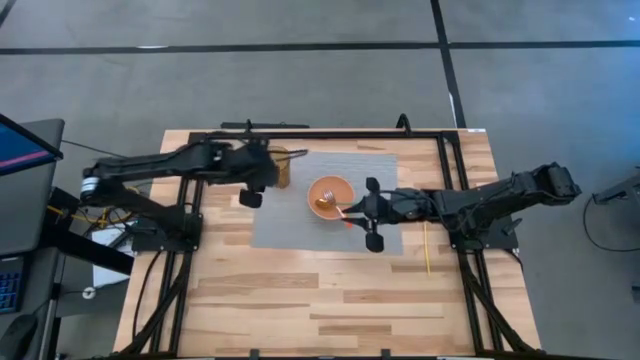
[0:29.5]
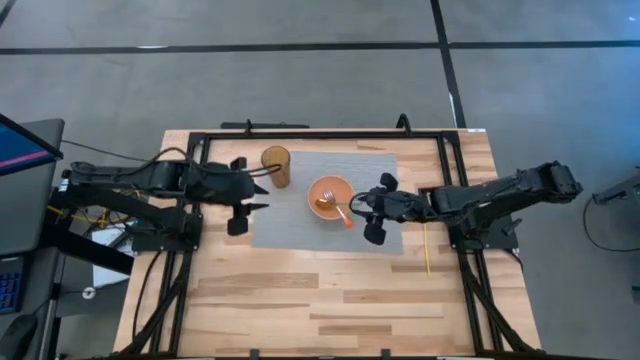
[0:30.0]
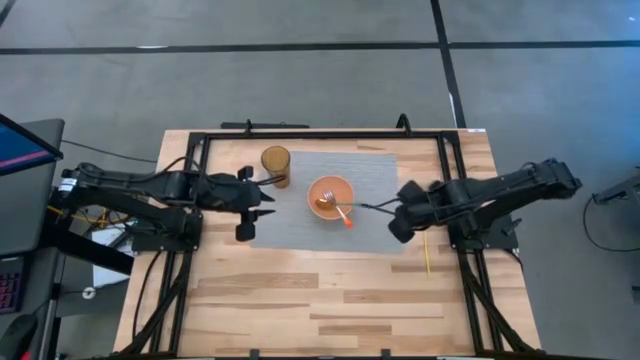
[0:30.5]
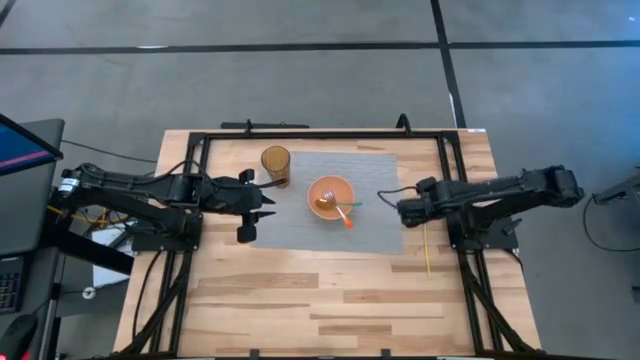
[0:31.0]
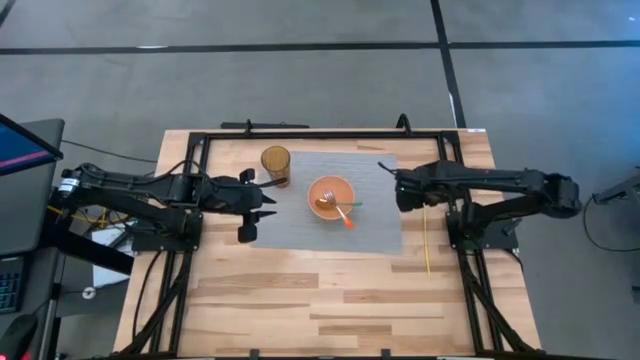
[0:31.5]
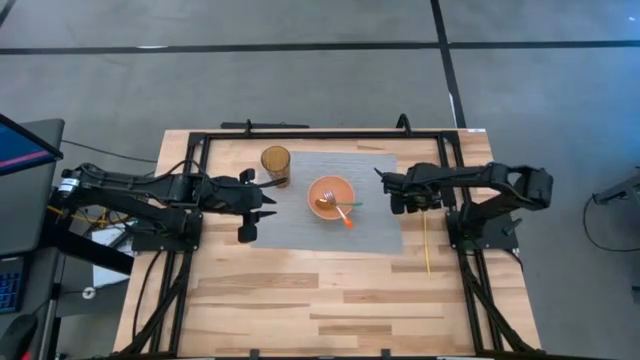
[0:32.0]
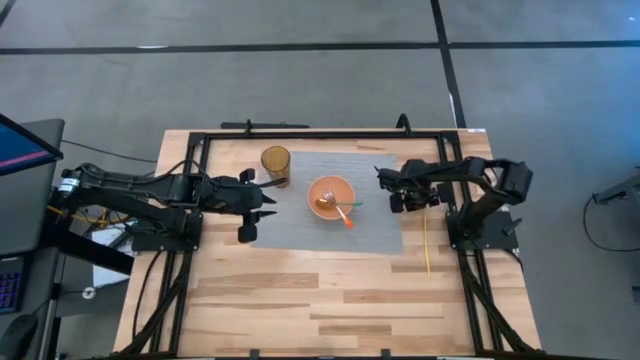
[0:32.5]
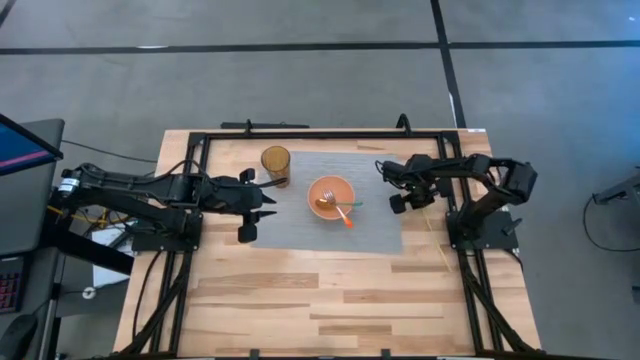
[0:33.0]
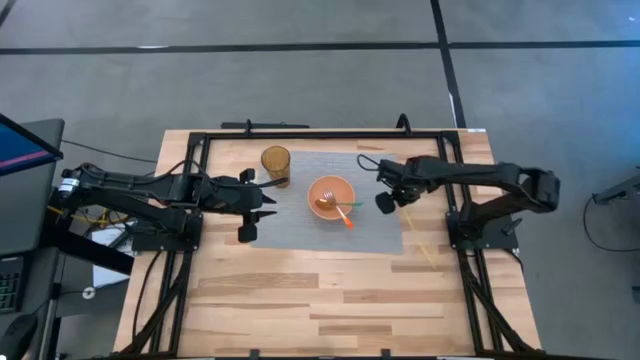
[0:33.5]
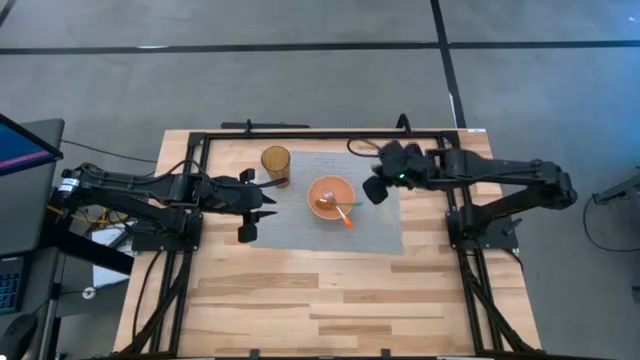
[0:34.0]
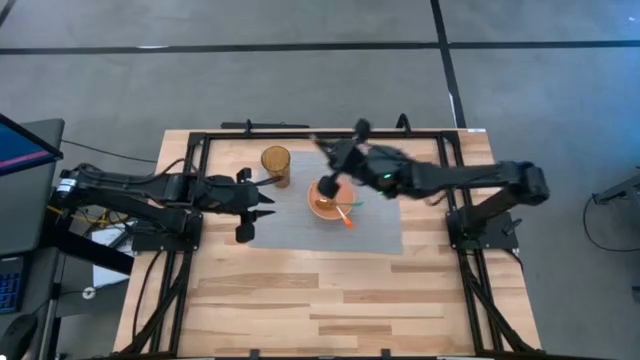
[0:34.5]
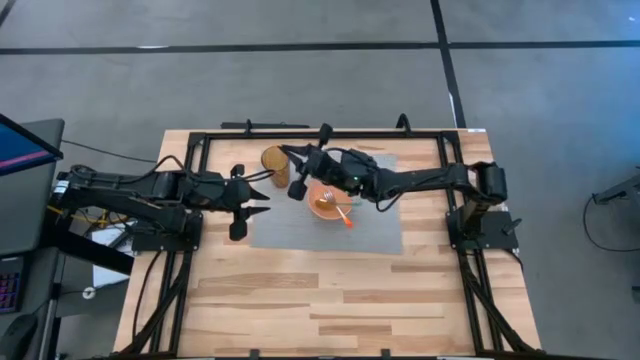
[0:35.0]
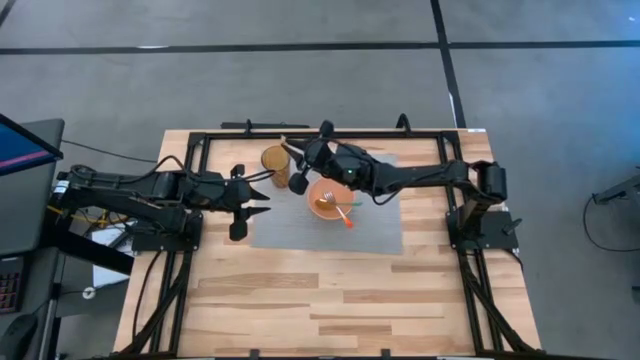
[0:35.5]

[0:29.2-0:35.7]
Task: Pick & Place Utensil
Put the yellow straw into the orange cup on the gray mat

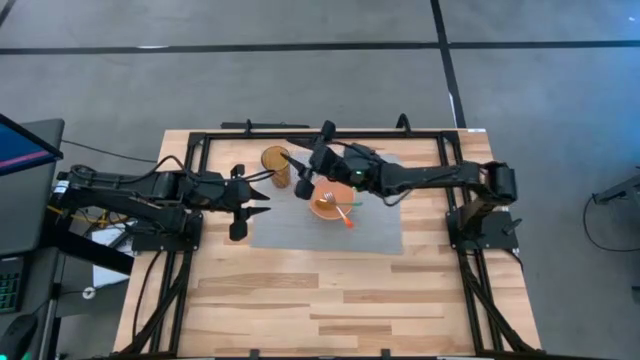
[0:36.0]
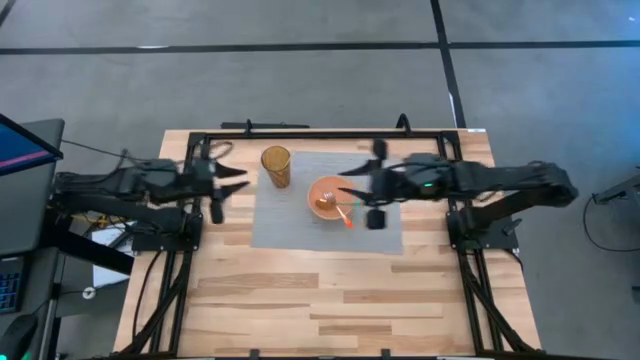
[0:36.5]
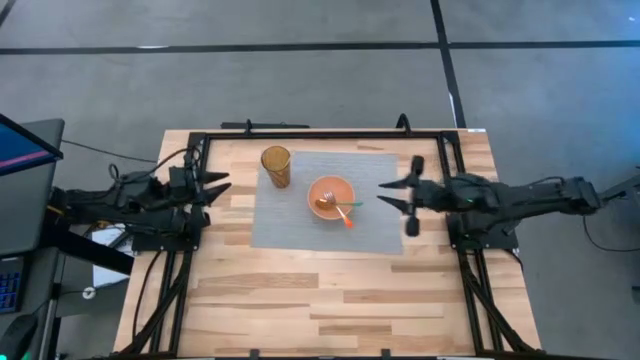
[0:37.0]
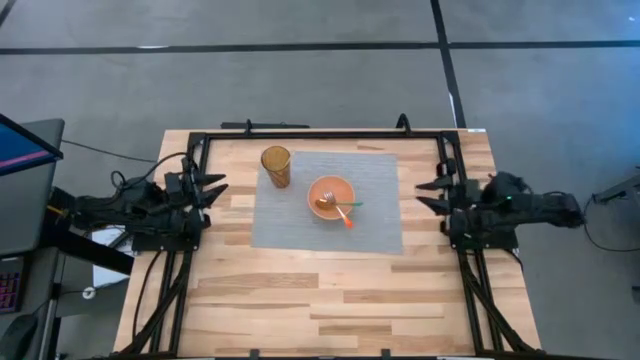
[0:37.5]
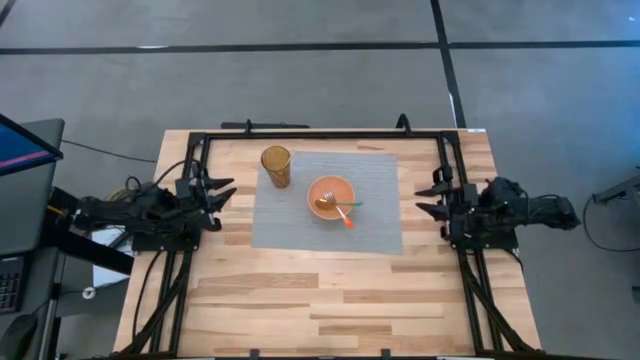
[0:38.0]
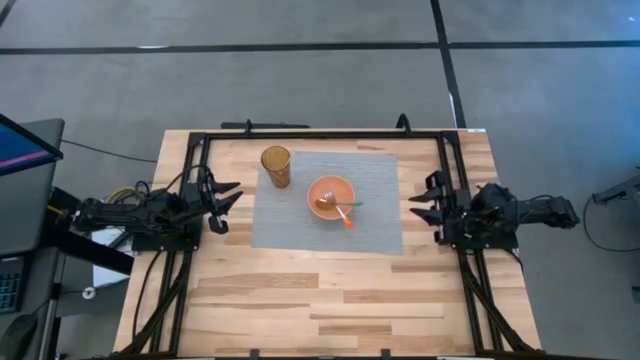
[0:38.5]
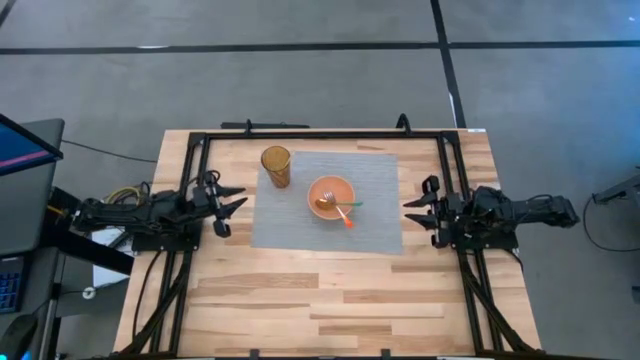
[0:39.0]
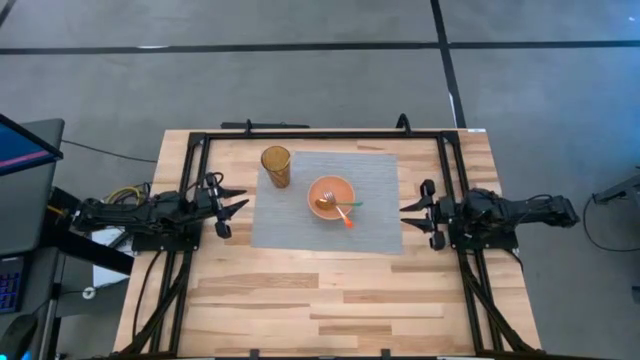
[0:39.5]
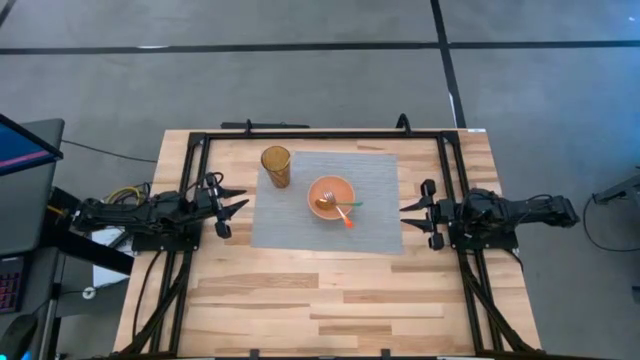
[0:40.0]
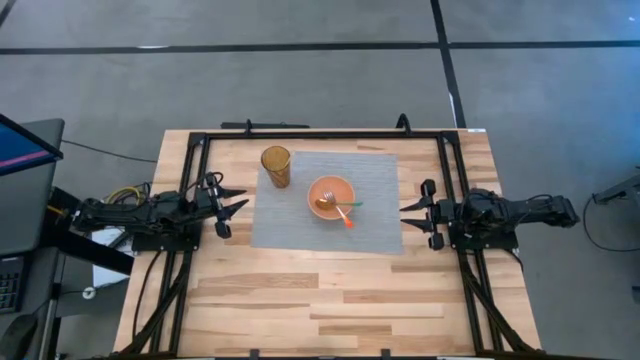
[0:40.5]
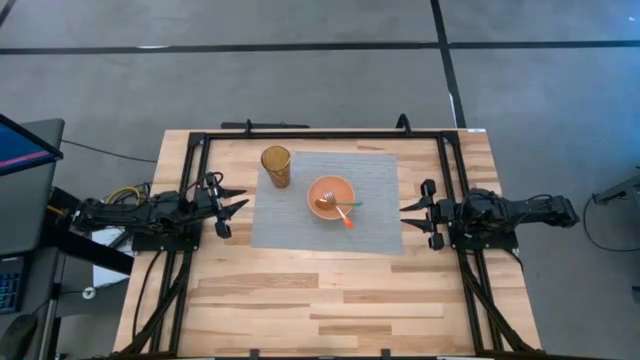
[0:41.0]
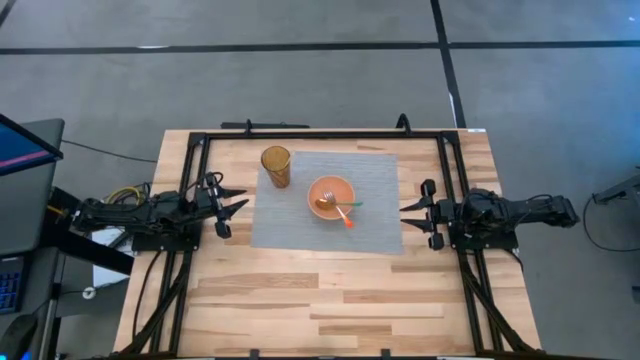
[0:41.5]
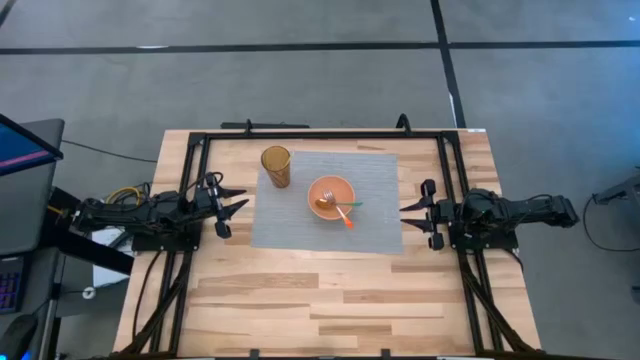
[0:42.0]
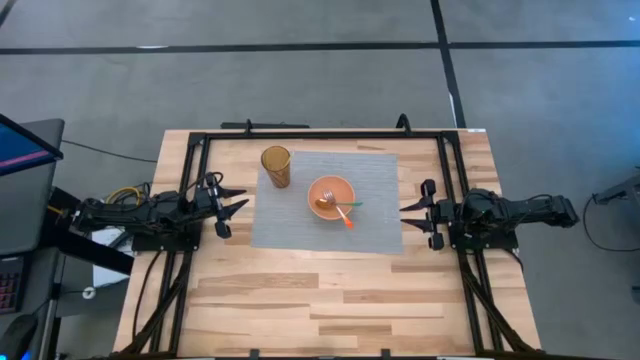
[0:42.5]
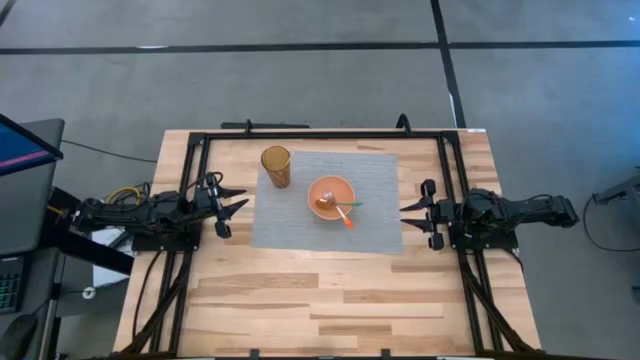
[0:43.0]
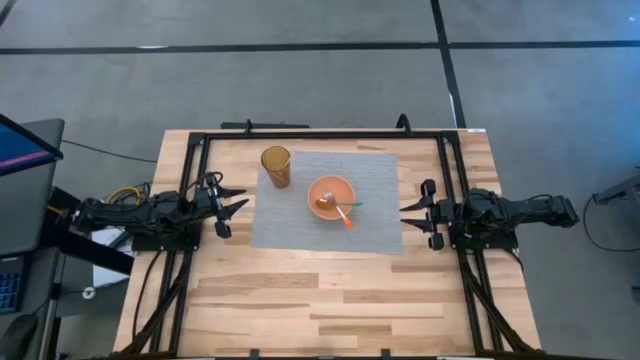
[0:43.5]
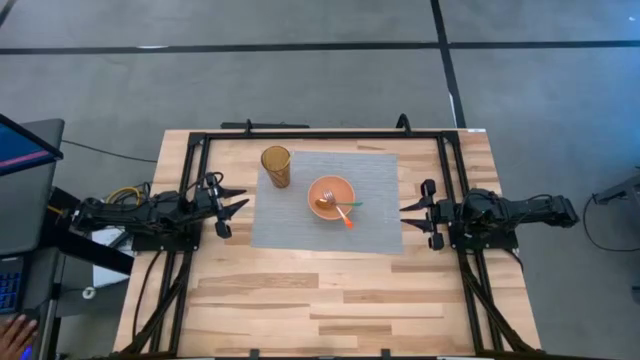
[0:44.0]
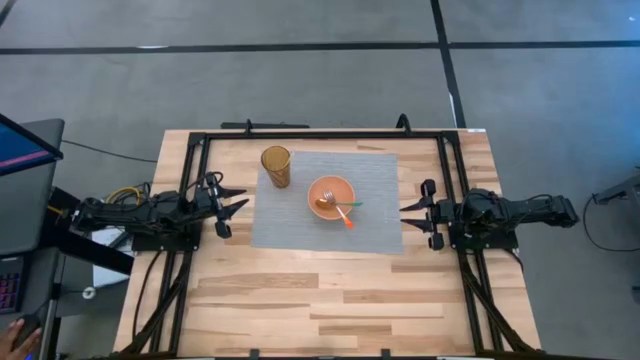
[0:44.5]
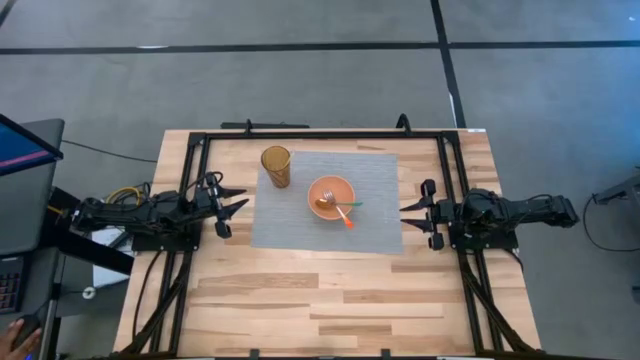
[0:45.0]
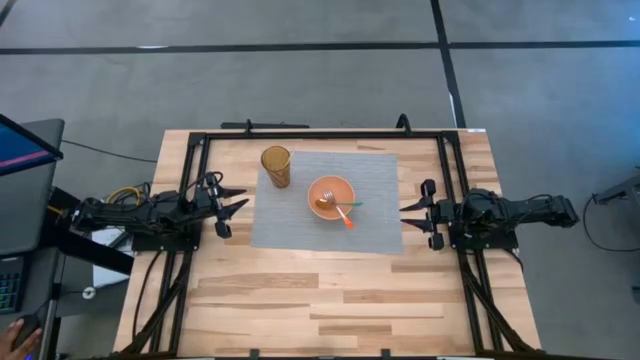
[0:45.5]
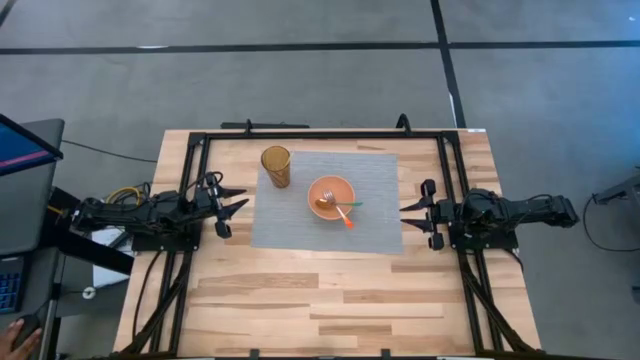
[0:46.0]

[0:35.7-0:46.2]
Return to Home Position

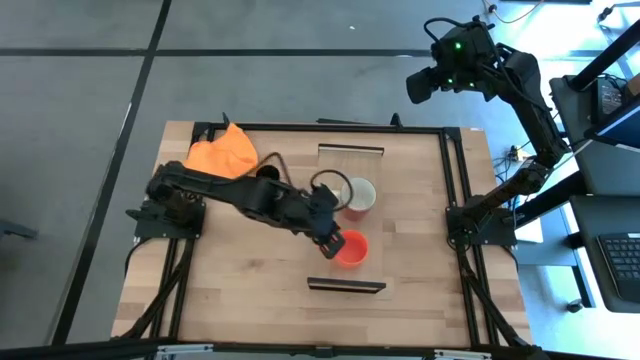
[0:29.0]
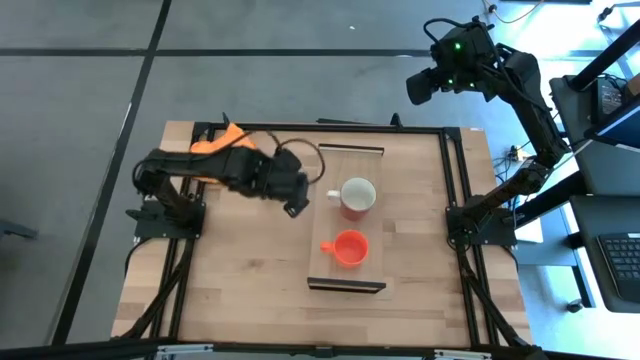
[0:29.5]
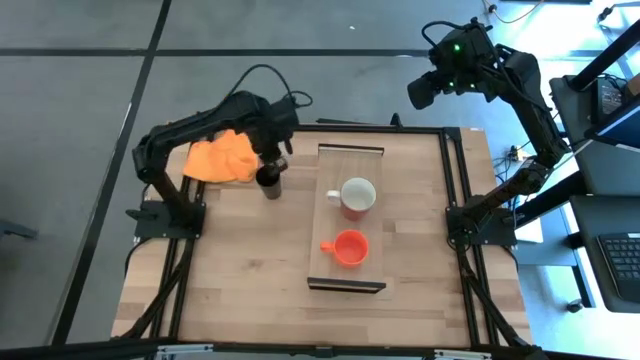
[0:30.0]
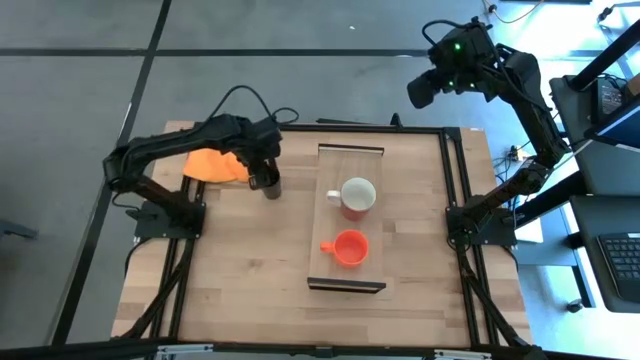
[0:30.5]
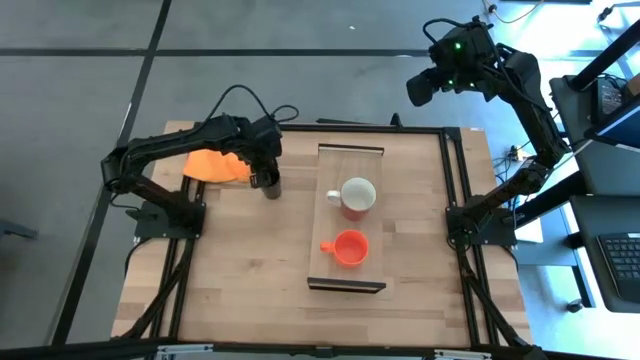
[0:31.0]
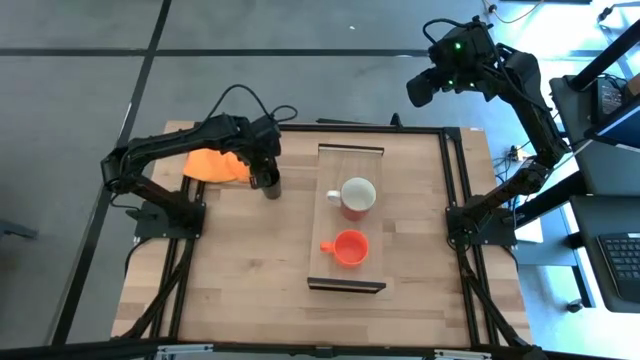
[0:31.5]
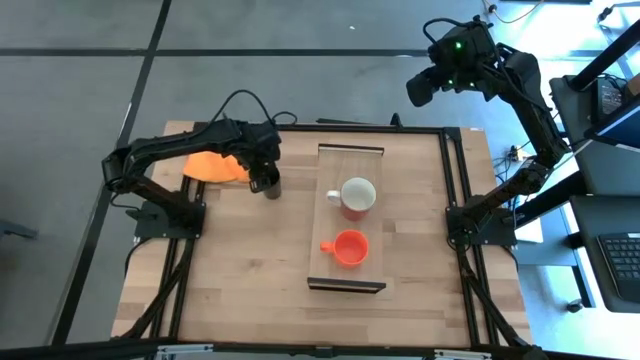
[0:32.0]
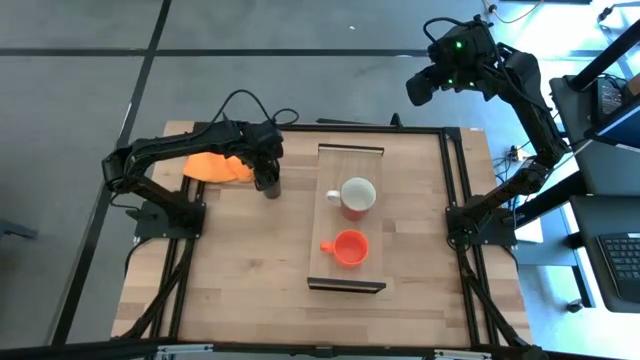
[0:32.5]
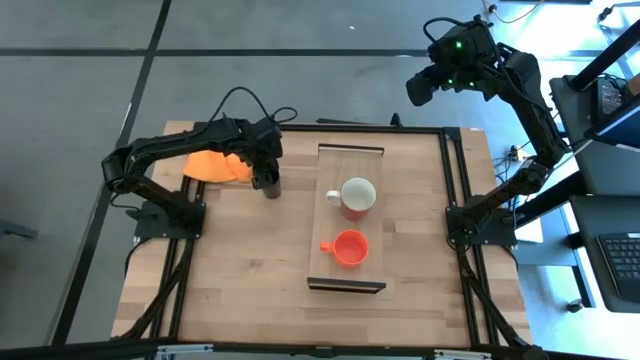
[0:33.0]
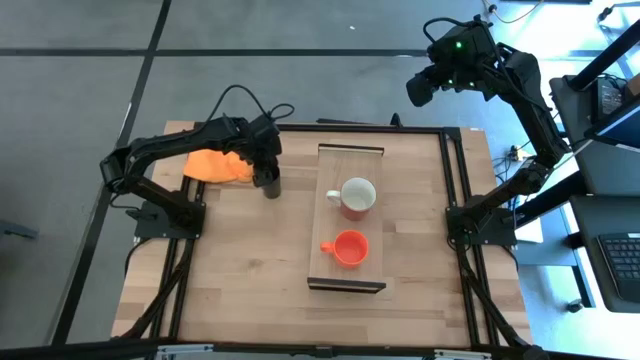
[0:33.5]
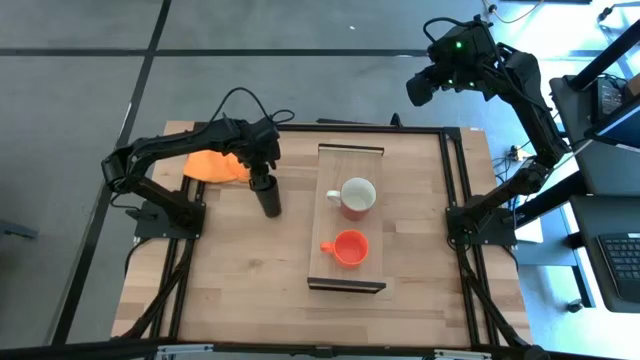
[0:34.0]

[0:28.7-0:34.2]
Task: Stack small to large cups/mugs on shelf
Put the black cup on the shelf
